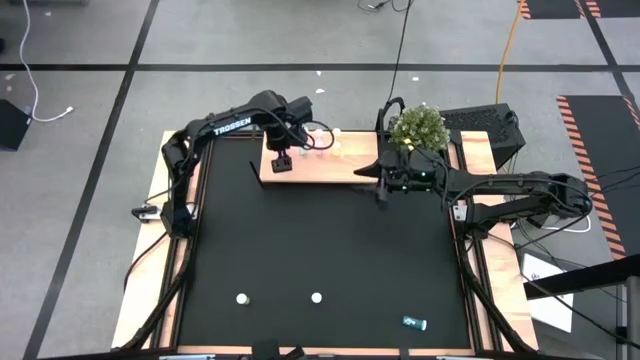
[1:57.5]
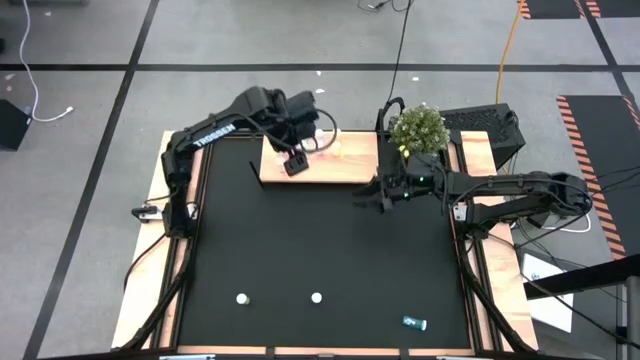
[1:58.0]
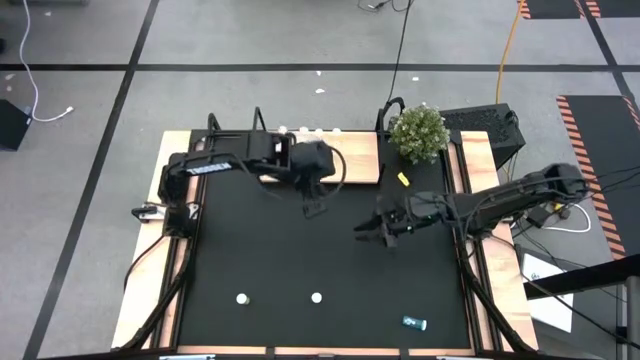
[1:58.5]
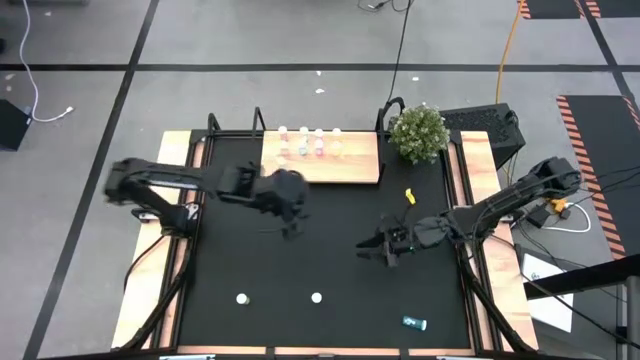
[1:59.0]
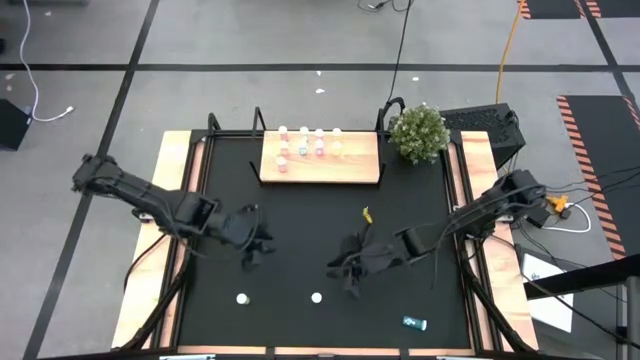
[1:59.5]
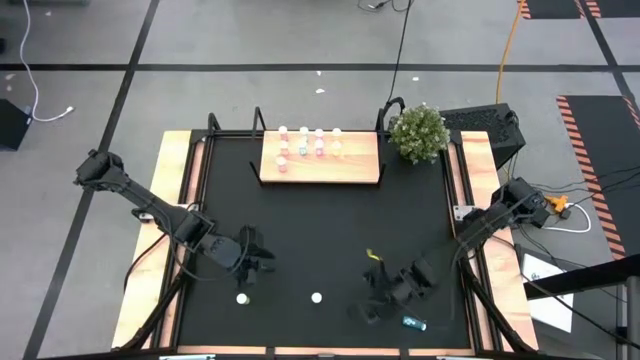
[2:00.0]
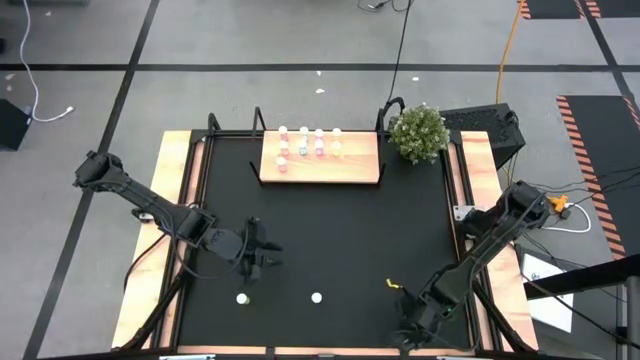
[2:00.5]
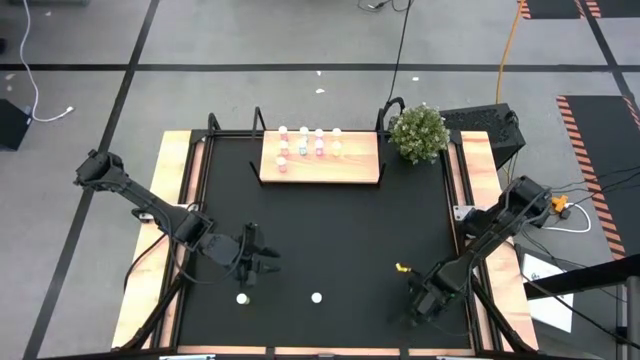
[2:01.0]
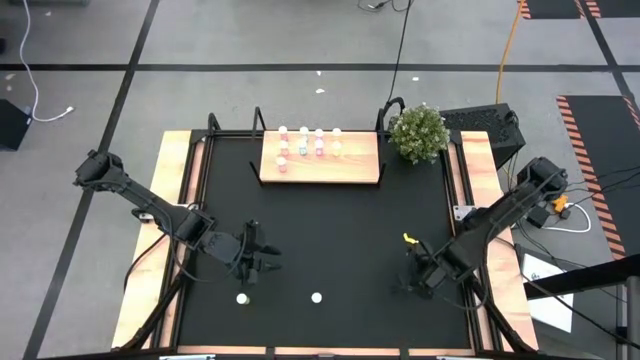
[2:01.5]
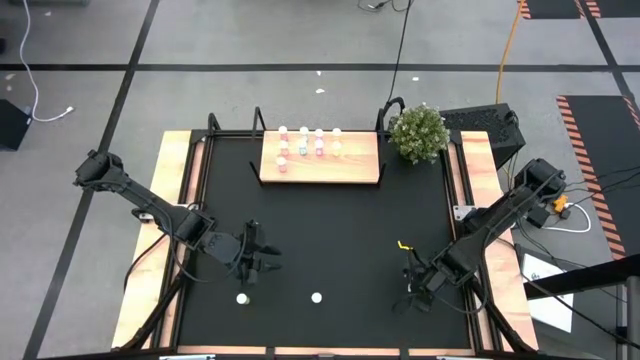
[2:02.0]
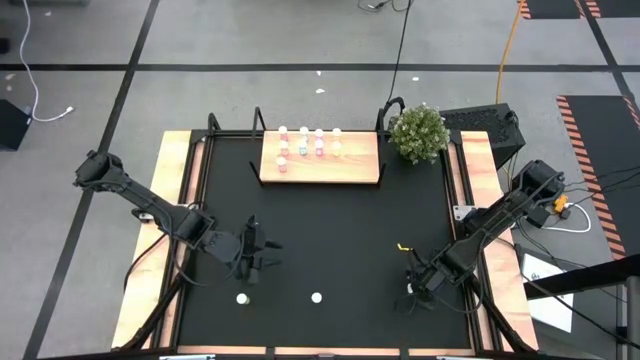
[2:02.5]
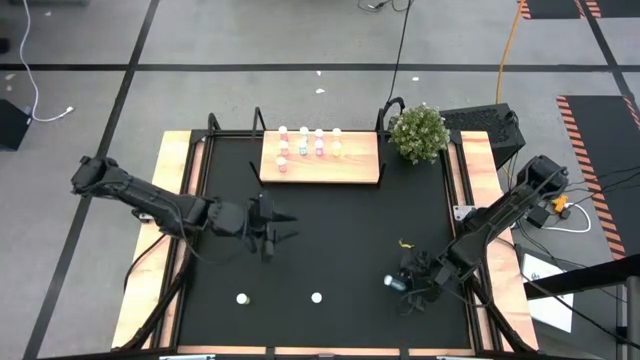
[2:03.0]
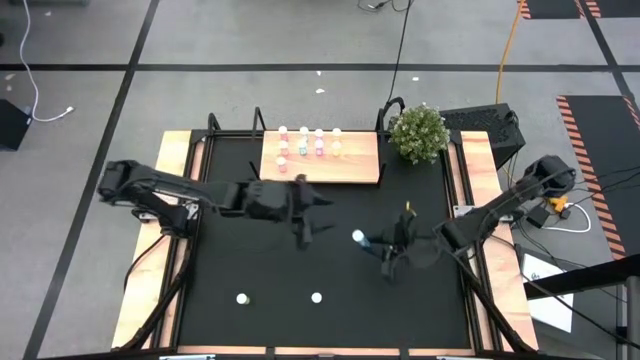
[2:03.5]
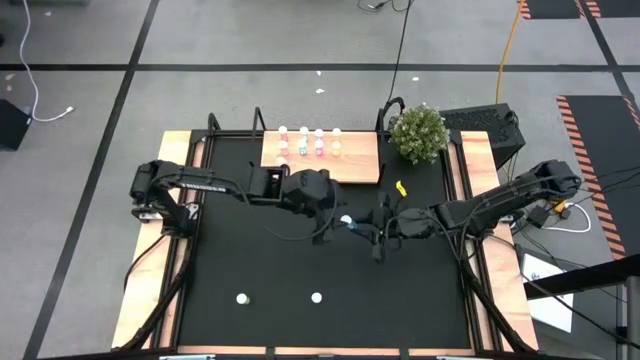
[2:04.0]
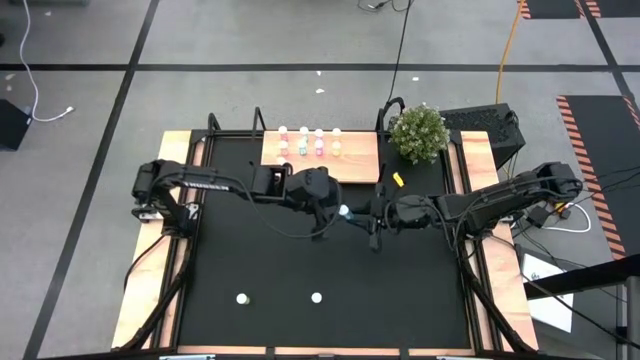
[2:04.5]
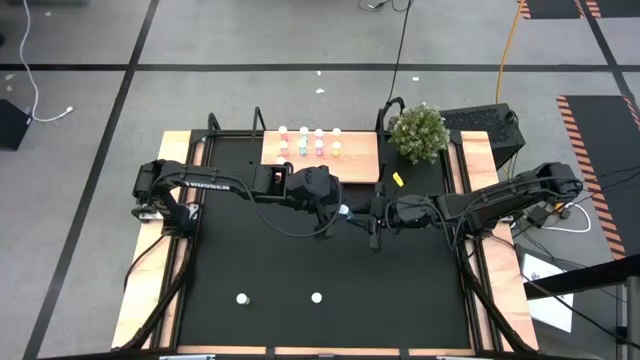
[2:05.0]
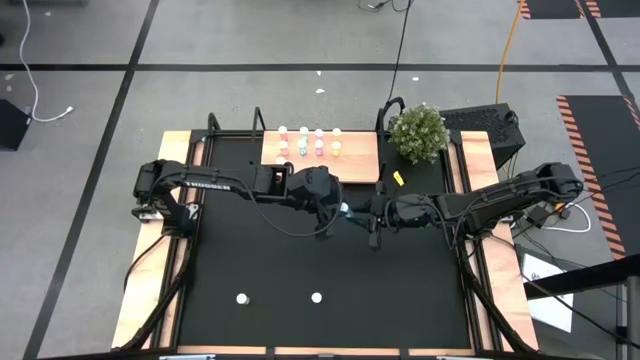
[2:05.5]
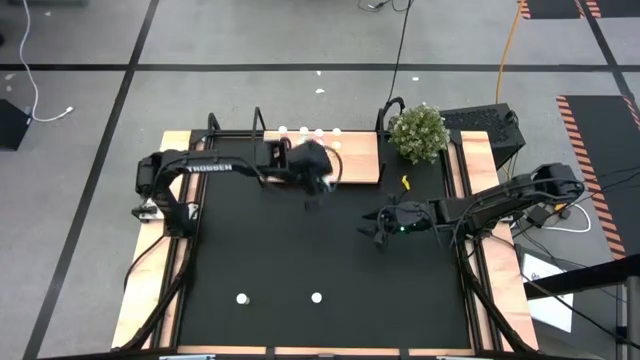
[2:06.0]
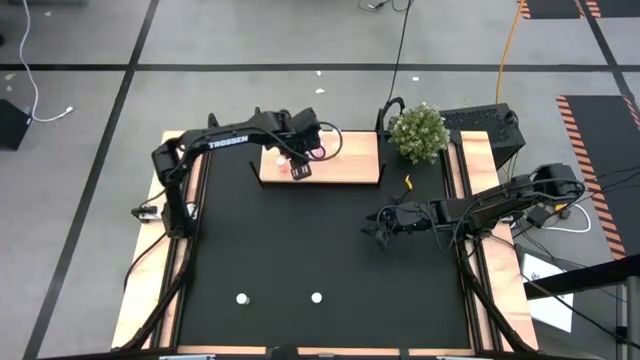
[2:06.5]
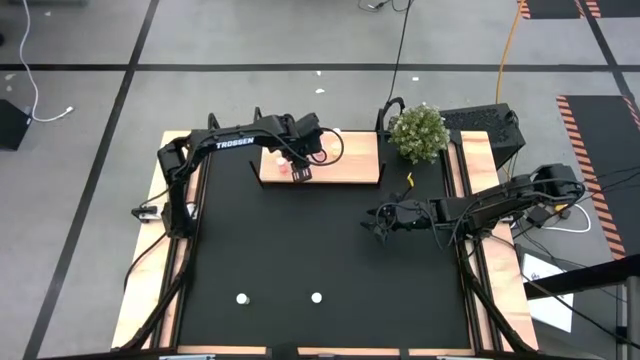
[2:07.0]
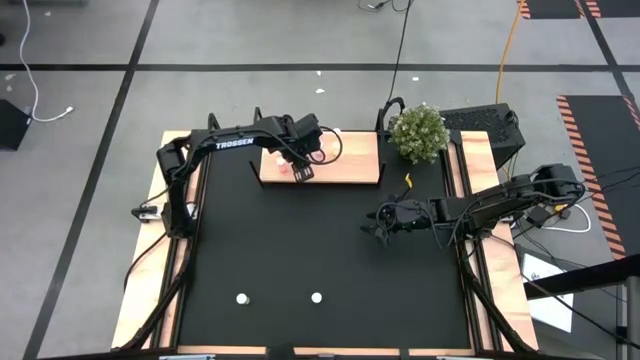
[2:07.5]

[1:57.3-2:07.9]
Task: Pick and place medicine bottles onto shelf by color
Put the blue pill bottle on the shelf aligned with the other blue pill bottles

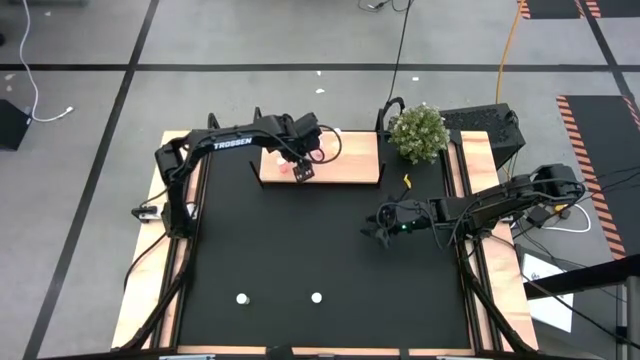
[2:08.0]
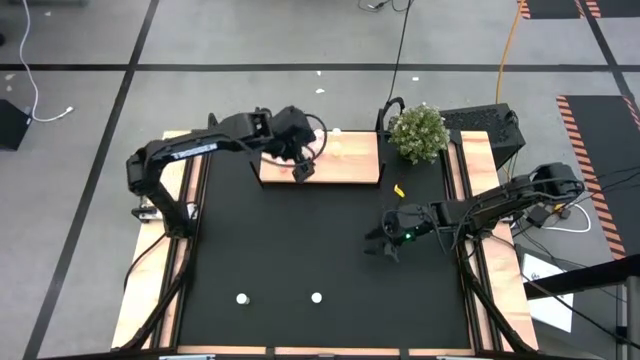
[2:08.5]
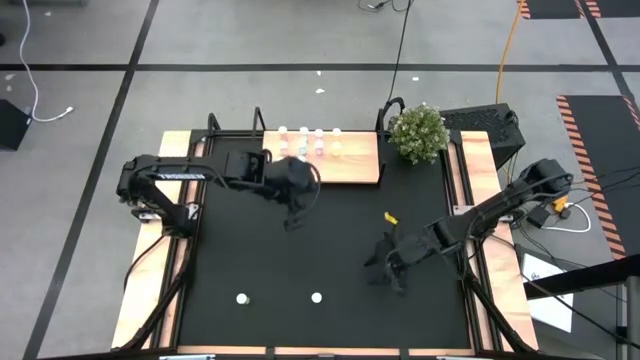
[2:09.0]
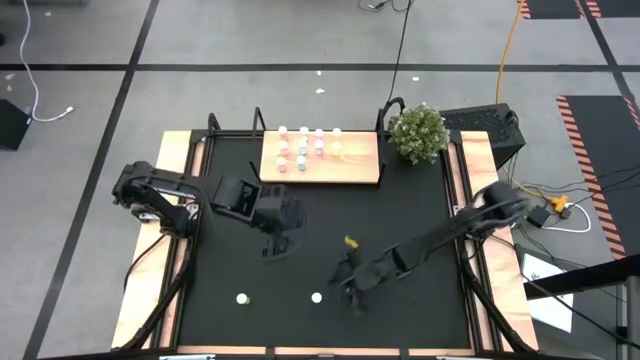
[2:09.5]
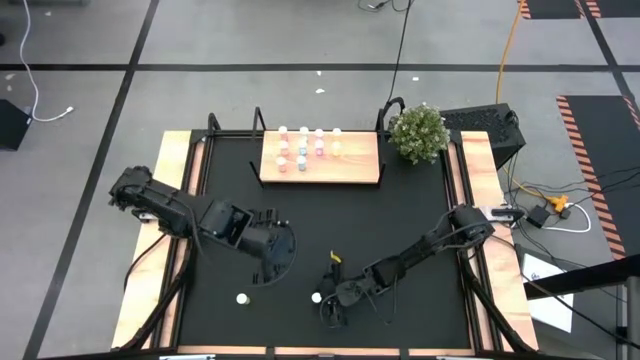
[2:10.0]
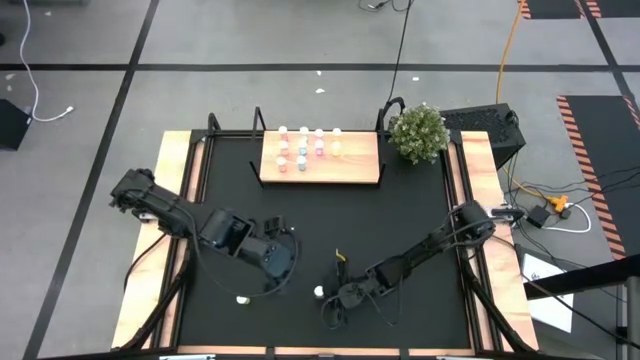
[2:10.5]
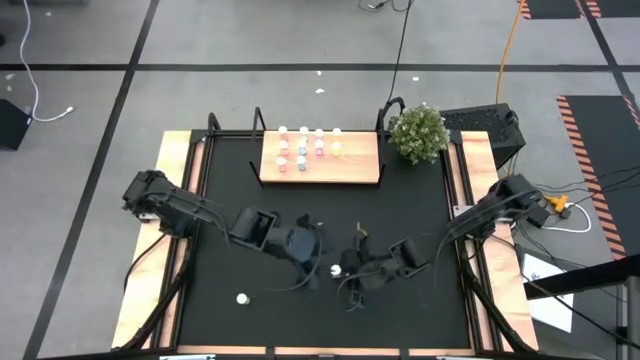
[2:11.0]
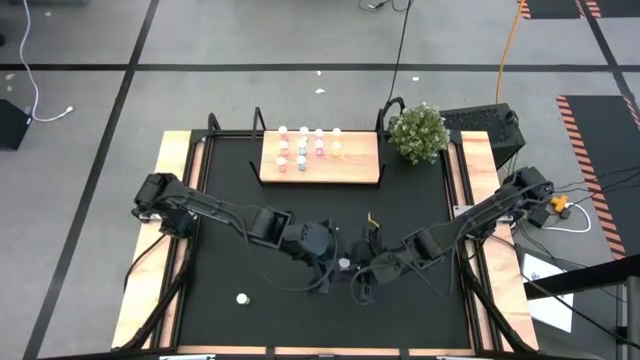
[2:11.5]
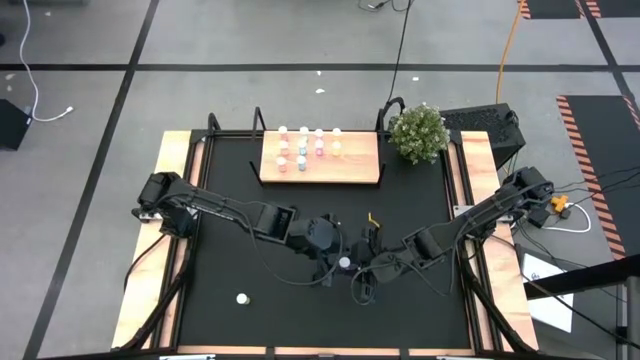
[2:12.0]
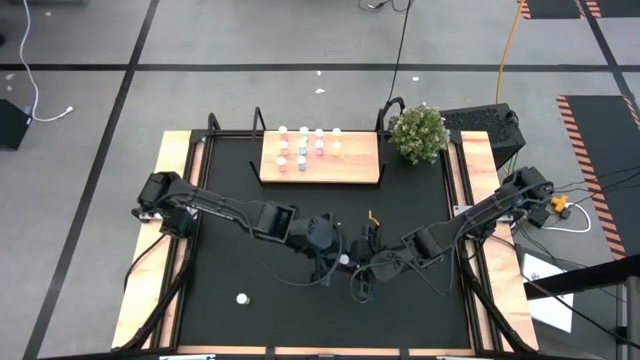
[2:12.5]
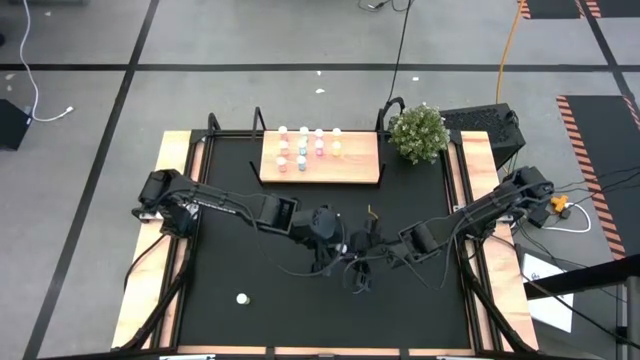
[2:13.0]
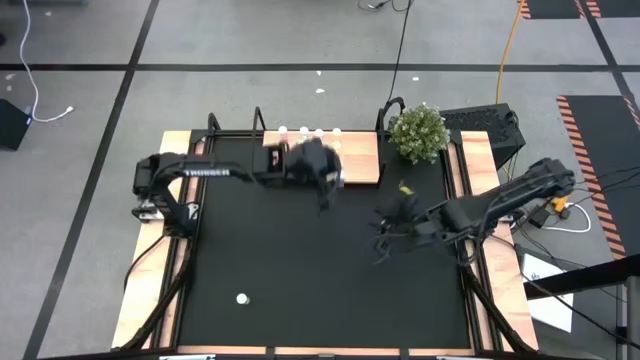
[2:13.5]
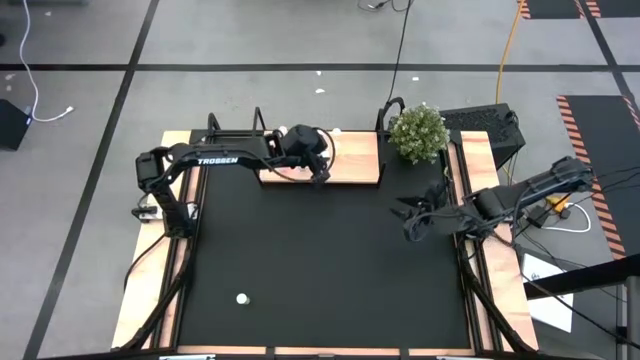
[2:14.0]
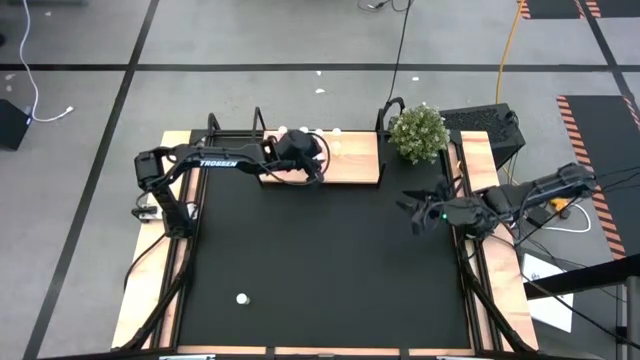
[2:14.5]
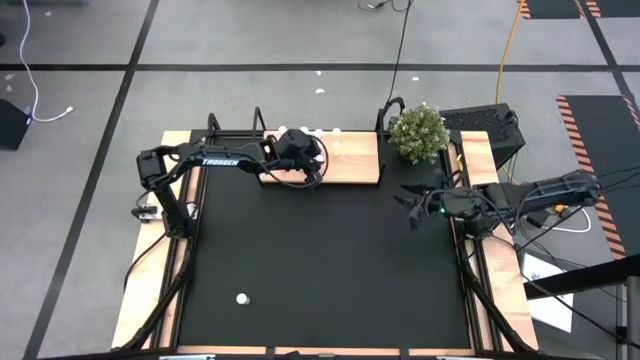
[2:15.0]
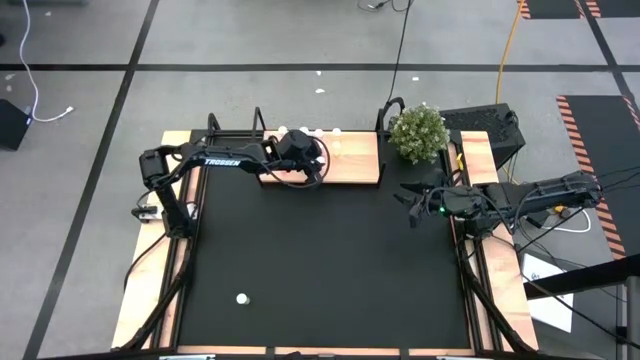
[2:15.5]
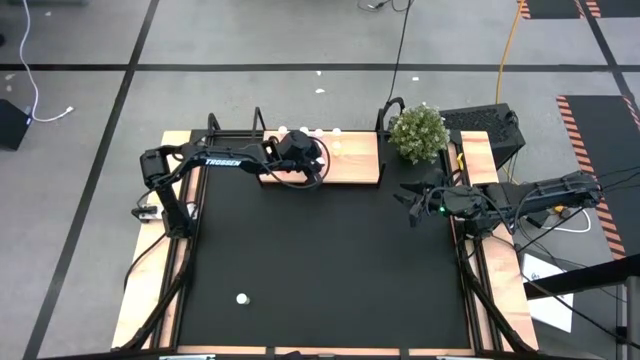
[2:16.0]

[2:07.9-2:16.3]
Put the pink pill bottle on the shelf aligned with the other pink pill bottles

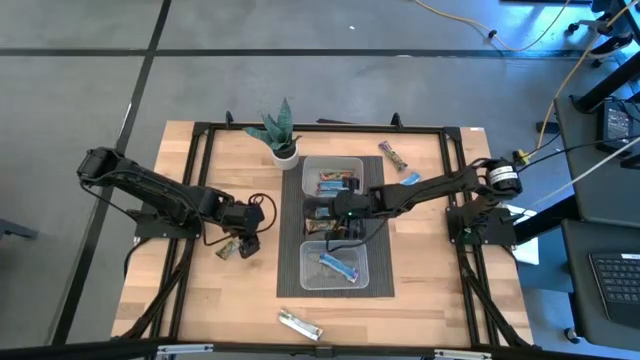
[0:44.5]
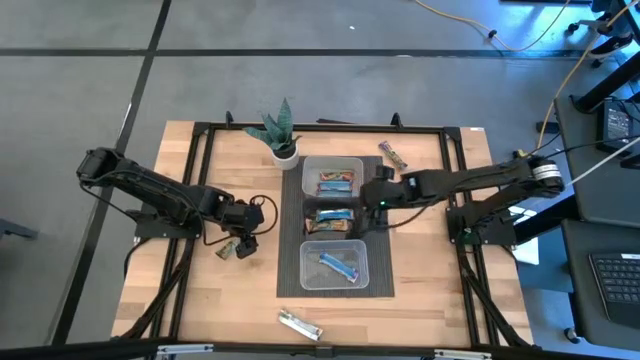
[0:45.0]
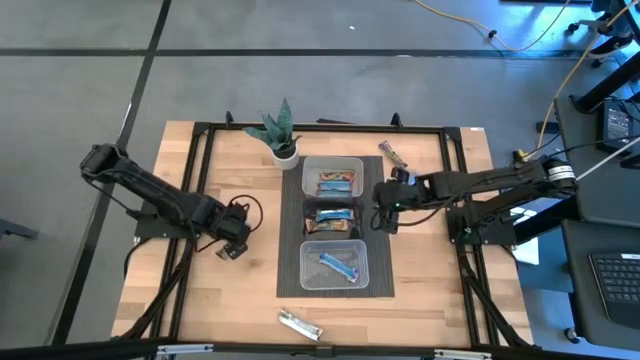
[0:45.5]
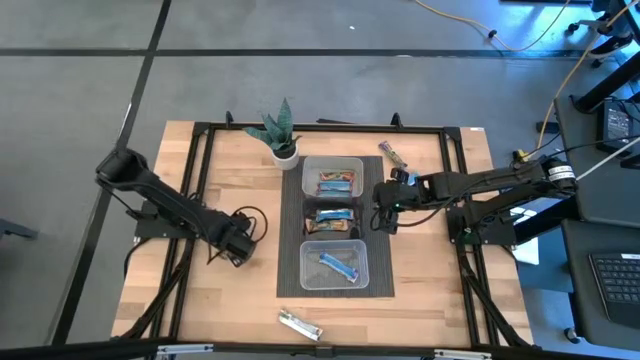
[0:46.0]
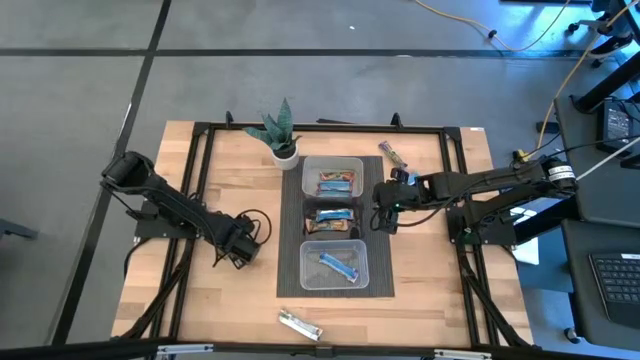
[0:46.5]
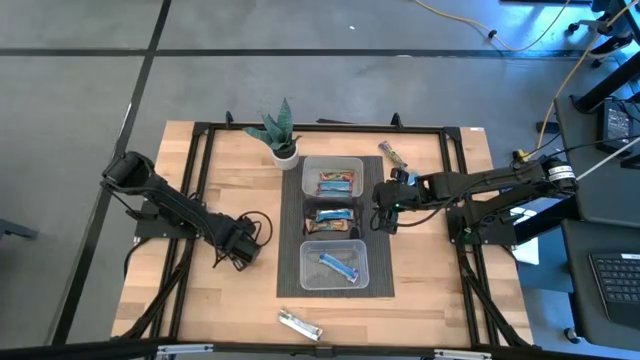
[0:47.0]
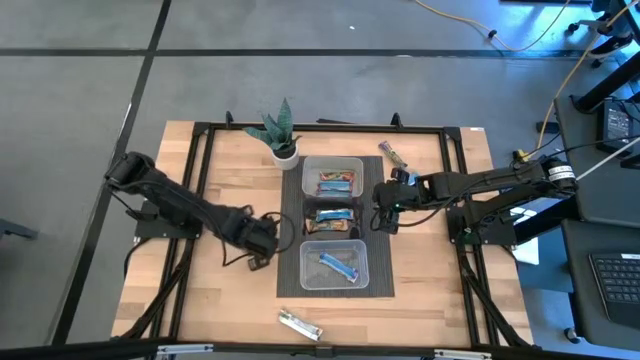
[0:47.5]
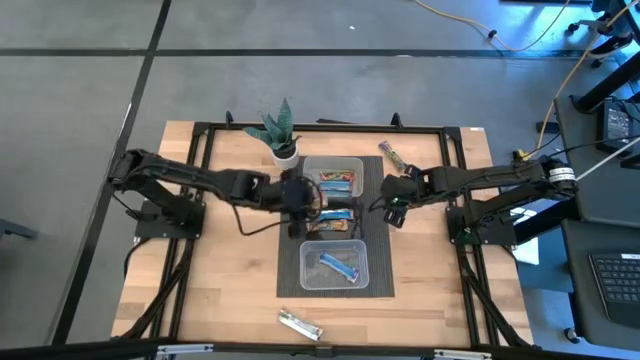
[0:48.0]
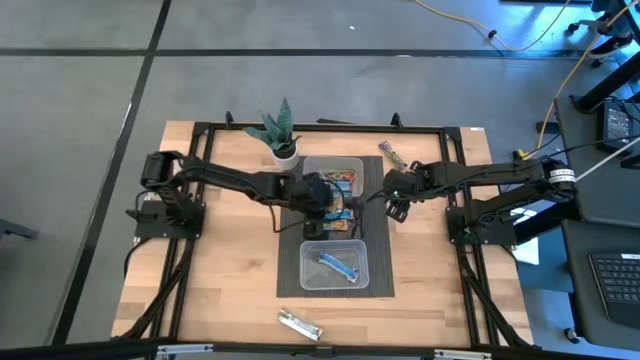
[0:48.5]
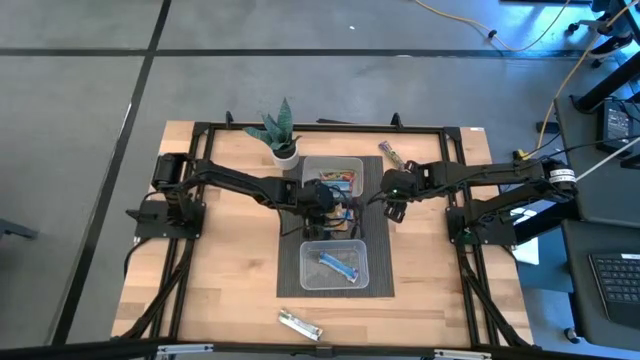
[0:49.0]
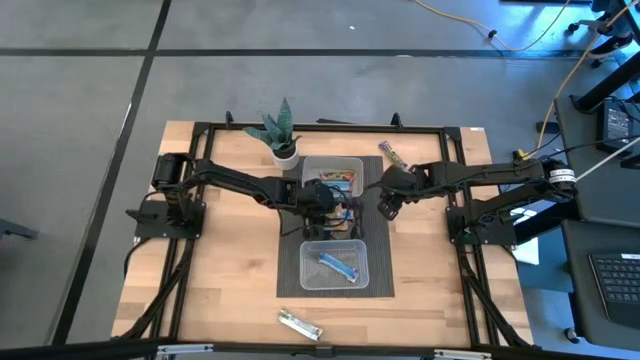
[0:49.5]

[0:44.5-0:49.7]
Task: Pick and place Granola Bars by type
Put the yellow granola bar into the black bin
